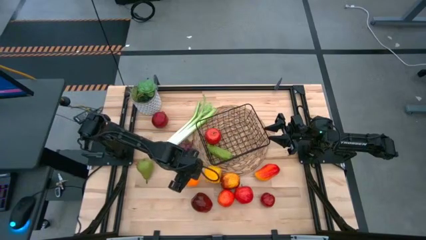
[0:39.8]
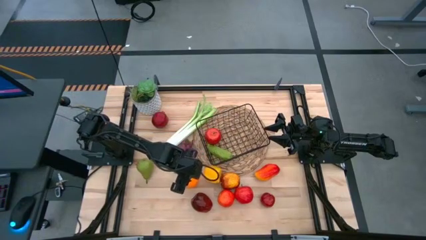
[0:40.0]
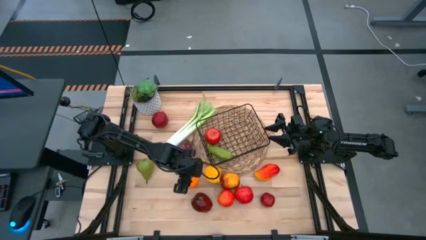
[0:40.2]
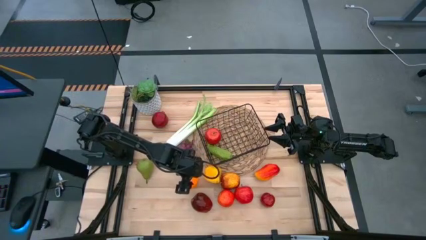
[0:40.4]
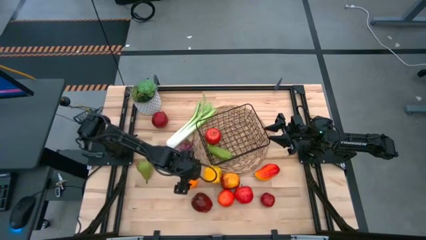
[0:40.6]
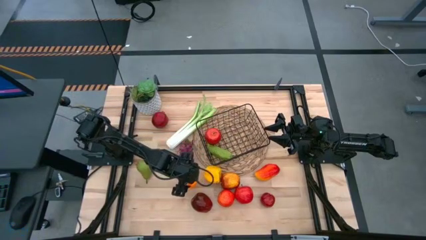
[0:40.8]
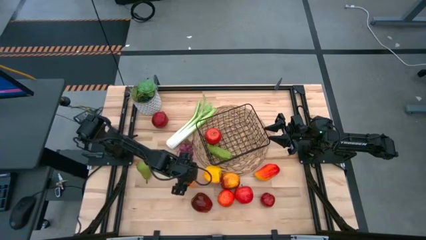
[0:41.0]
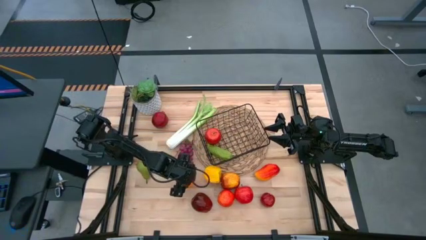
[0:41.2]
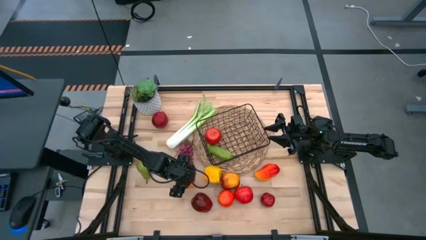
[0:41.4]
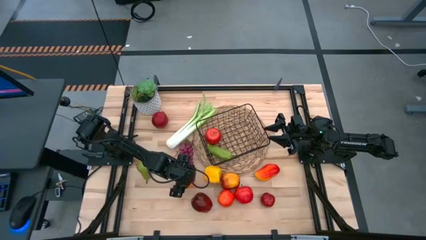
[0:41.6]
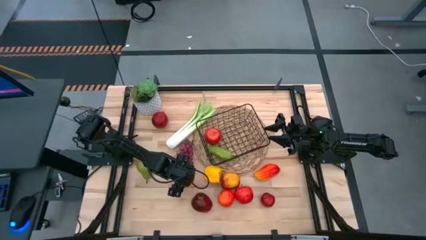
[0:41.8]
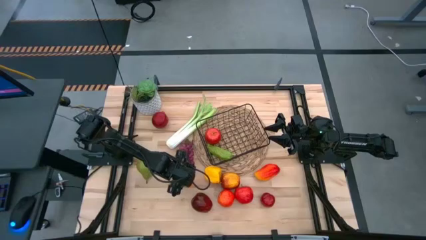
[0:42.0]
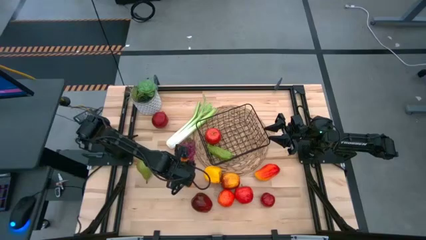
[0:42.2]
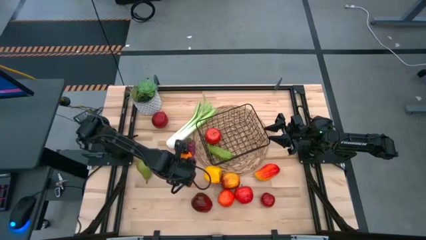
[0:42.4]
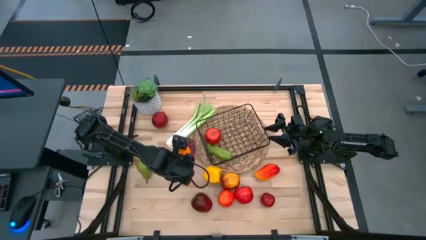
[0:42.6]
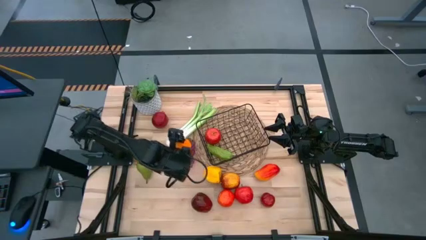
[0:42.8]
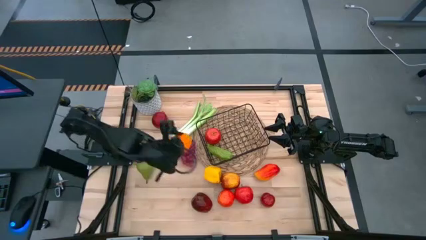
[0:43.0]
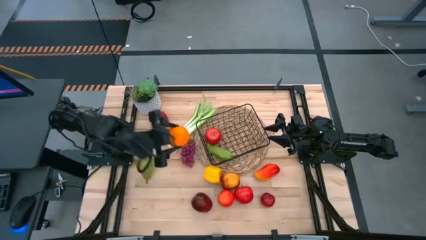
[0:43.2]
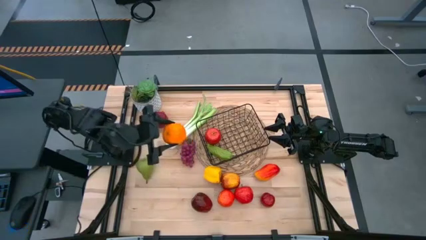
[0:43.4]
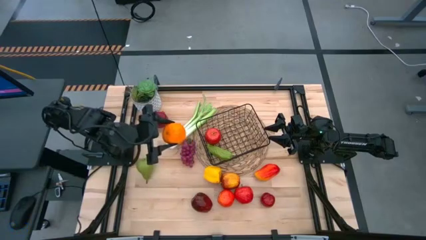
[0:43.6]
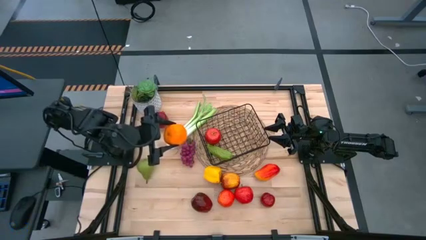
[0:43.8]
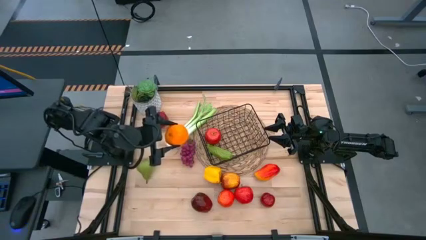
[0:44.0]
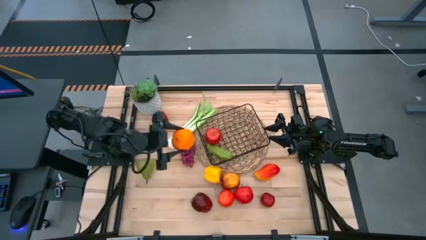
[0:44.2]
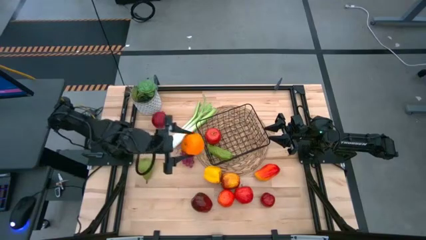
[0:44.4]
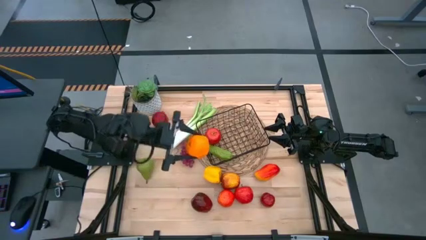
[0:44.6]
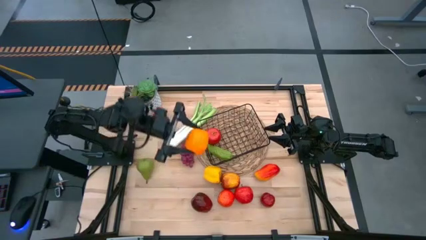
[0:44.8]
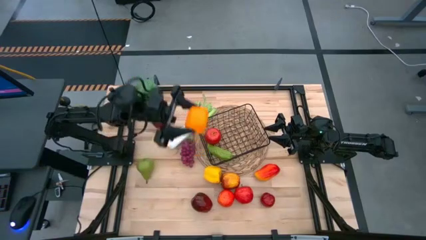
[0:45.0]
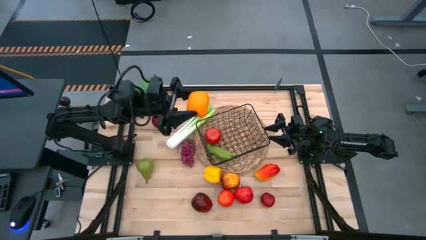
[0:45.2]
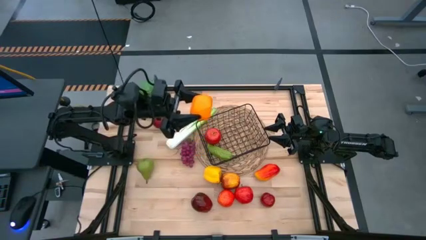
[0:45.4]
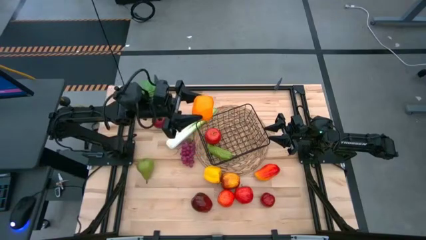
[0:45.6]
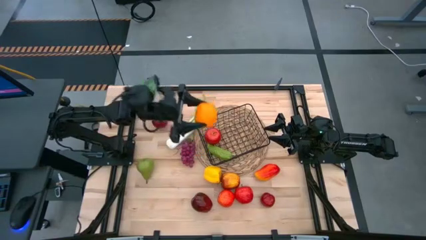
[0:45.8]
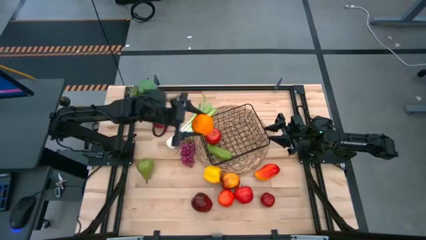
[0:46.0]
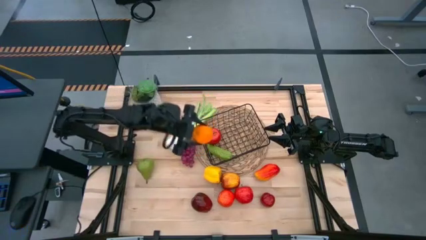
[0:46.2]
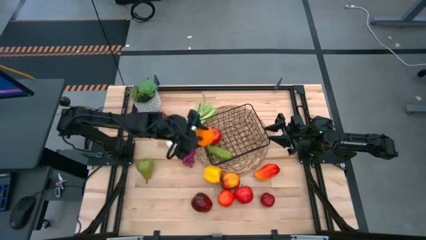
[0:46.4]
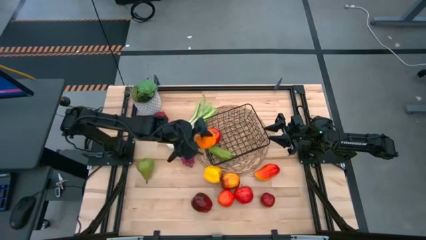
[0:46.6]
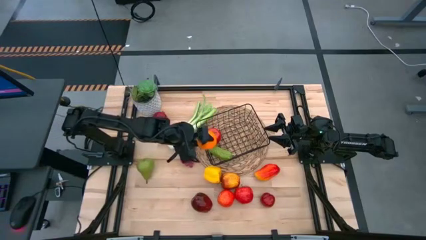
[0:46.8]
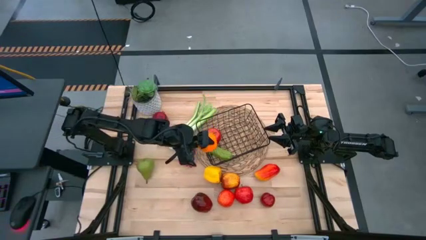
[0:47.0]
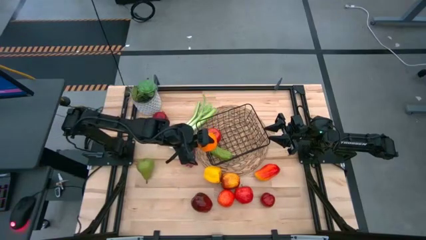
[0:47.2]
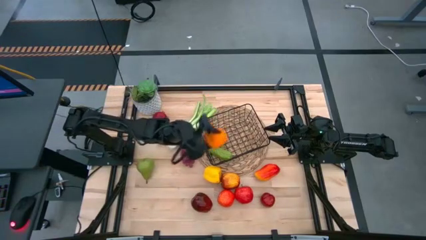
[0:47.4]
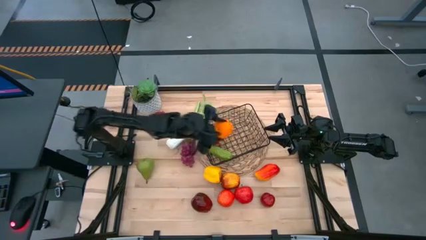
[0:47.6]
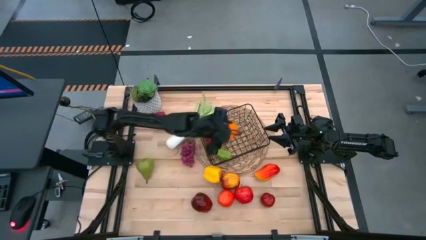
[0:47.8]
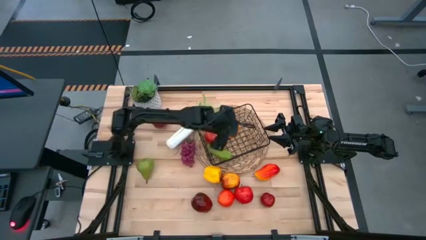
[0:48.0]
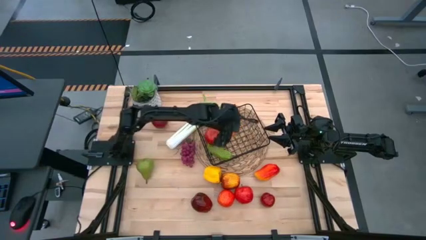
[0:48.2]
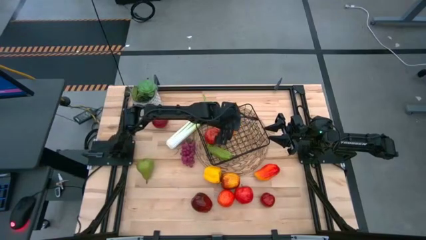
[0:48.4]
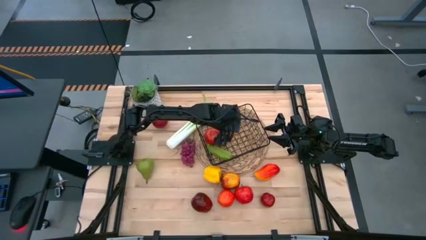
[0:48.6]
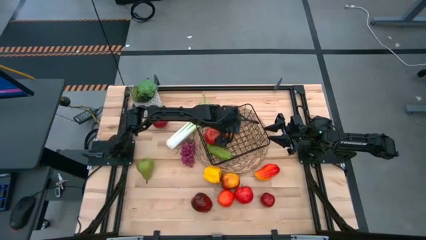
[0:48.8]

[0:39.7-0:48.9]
Task: Build produce basket
Put the orange into the black wire basket

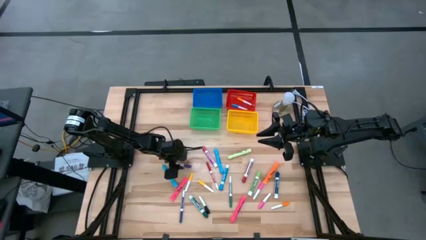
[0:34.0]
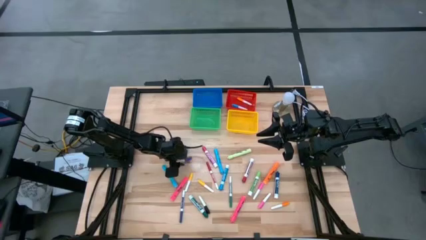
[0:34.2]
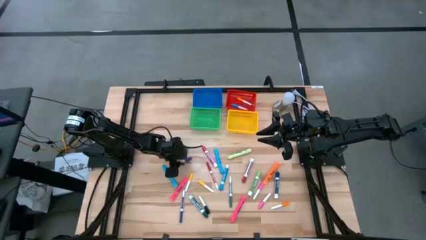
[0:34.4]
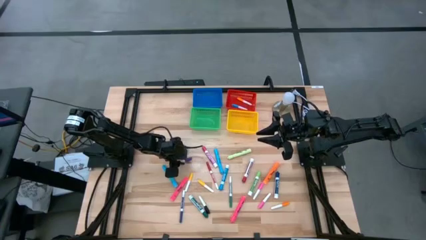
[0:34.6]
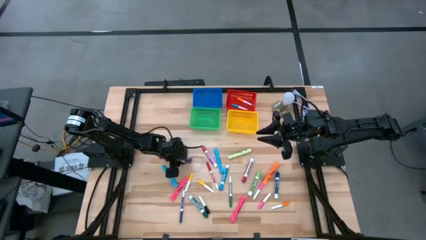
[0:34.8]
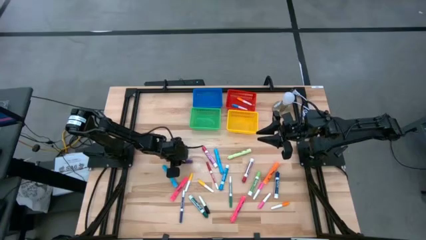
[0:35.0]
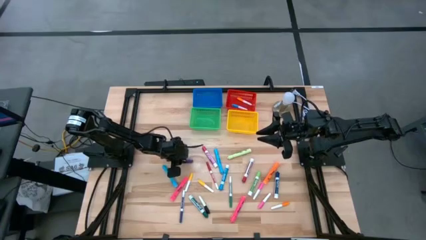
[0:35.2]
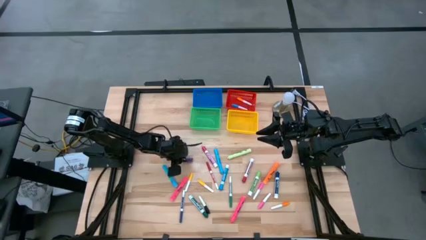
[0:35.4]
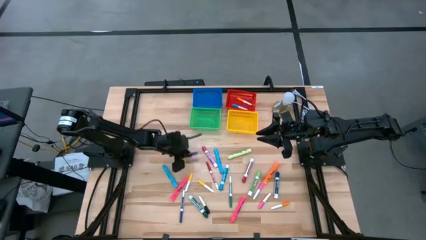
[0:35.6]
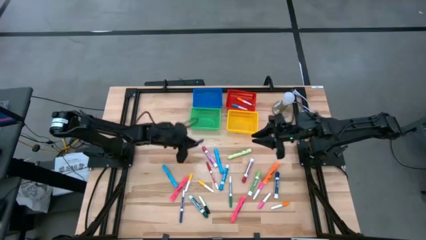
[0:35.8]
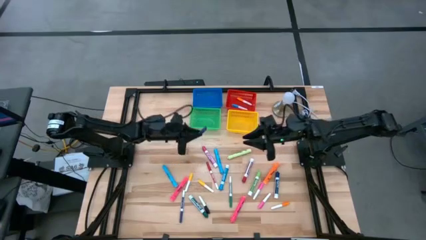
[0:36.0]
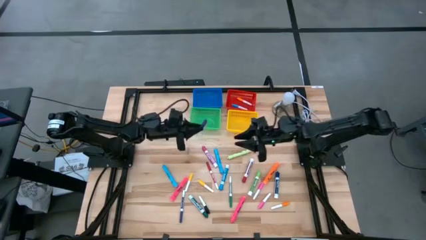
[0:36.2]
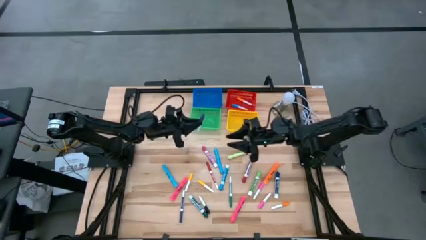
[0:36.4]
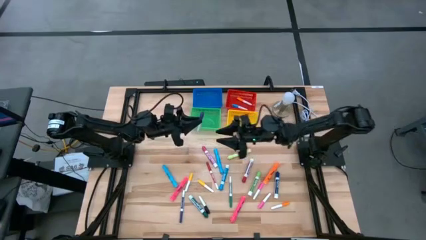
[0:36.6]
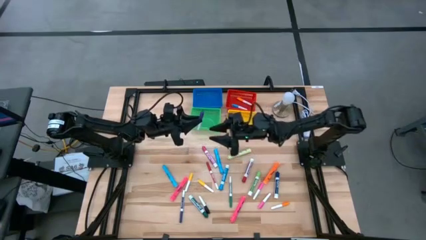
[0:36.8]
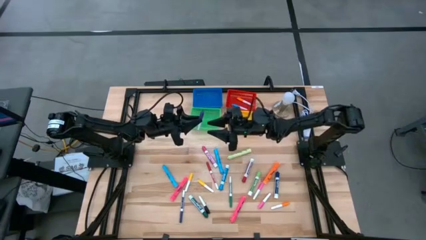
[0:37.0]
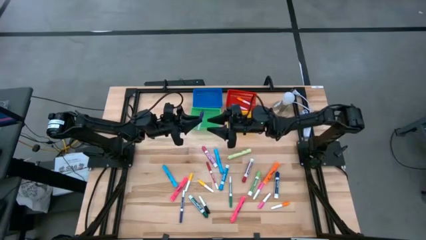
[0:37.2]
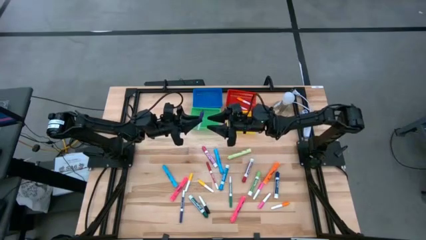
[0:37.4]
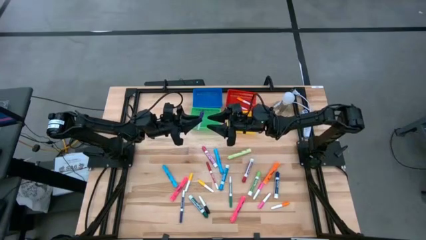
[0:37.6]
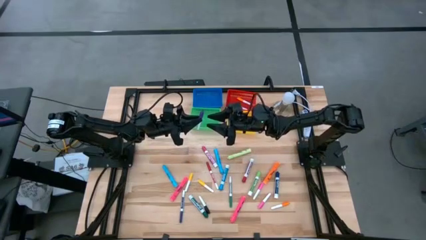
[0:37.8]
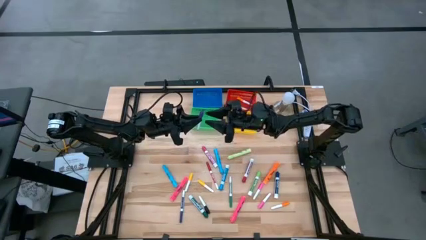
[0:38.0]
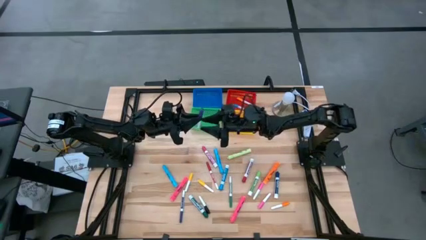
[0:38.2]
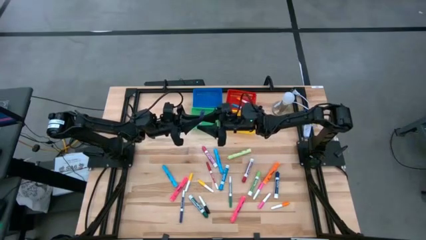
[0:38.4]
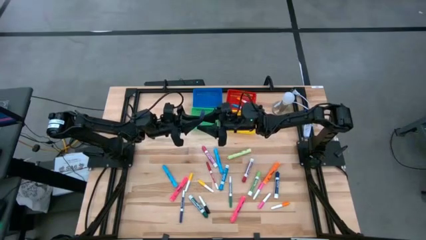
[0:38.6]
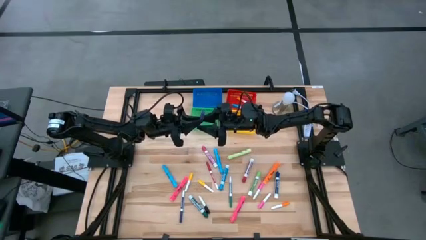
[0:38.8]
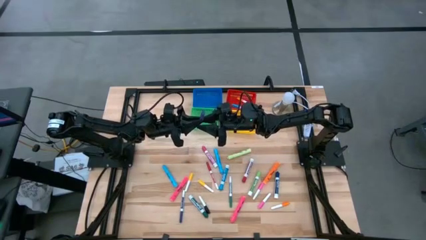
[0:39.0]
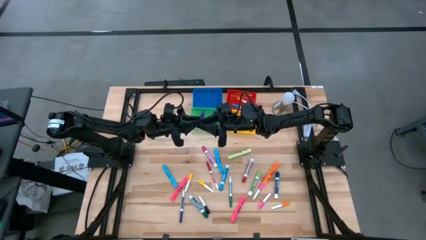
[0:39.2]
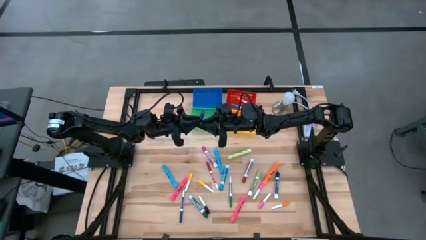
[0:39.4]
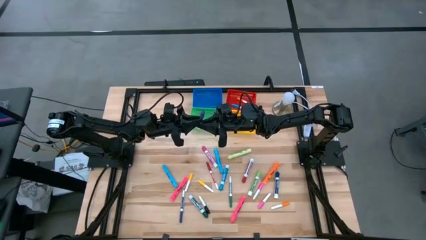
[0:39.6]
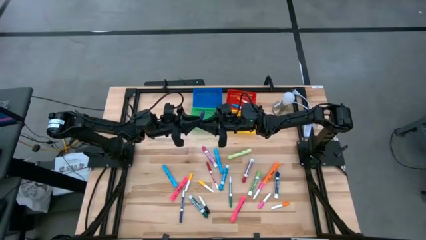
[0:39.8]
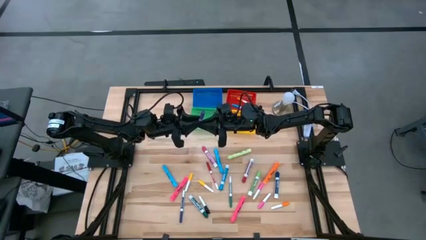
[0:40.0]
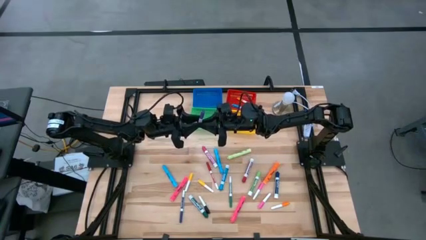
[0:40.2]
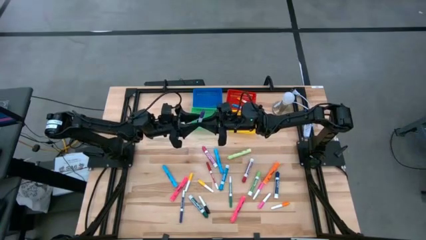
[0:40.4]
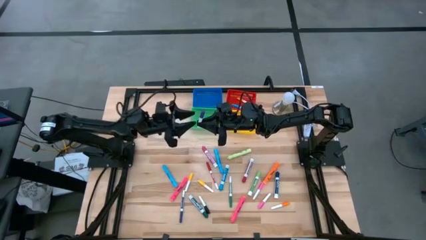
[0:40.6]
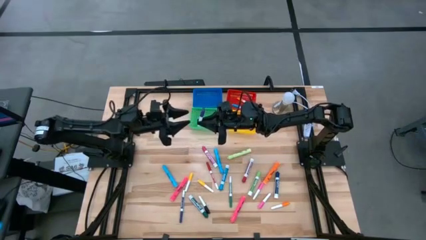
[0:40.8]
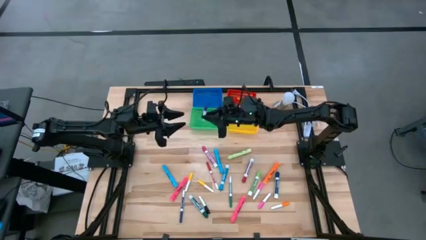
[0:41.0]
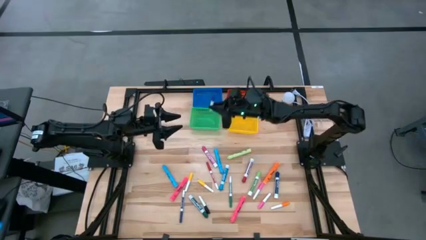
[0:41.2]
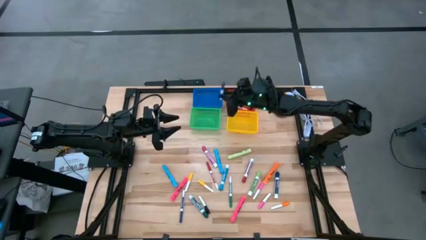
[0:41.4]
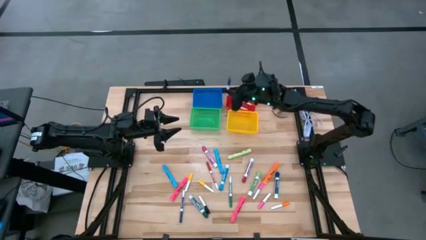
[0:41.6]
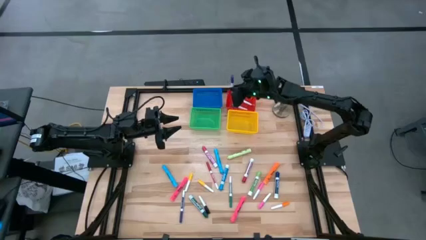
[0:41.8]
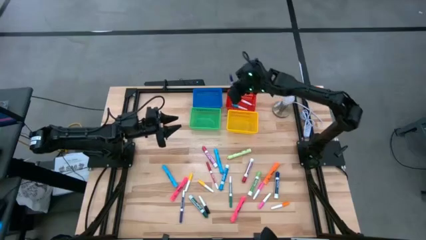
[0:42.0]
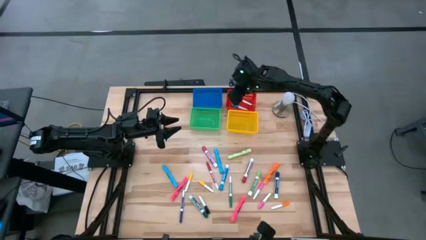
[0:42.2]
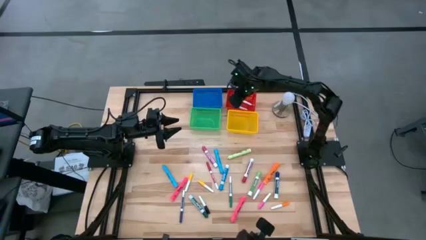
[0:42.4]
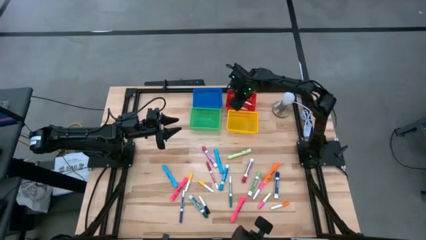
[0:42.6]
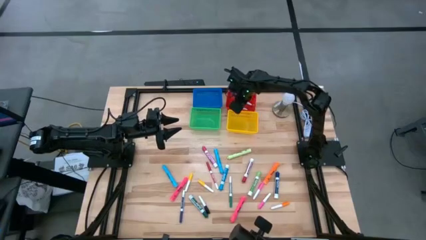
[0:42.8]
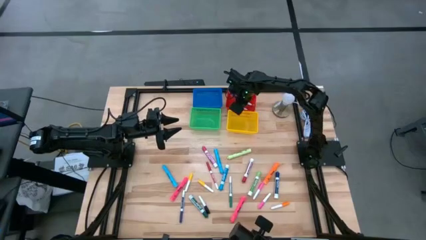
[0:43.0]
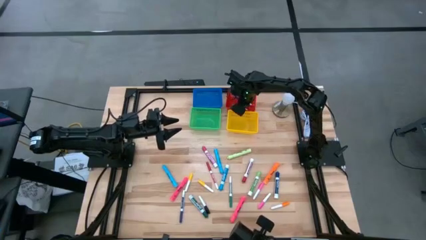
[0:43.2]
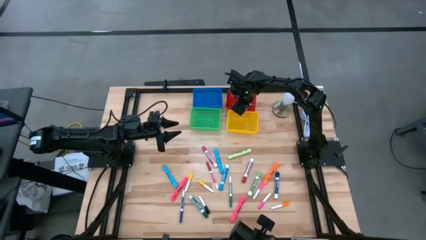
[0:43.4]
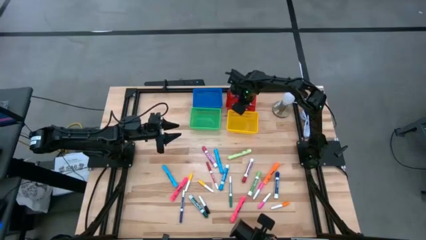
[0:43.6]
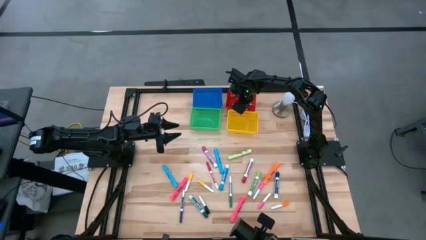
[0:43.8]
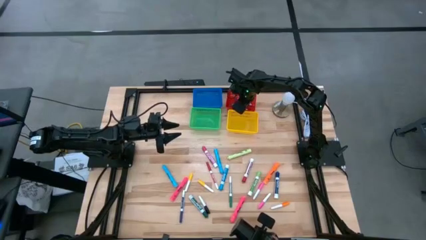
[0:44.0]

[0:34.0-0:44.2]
Task: Pick & Place Markers
Put the purple pen into the red basket
